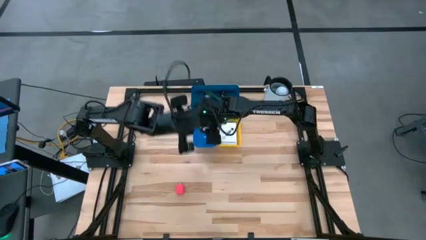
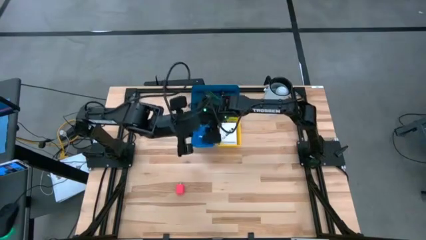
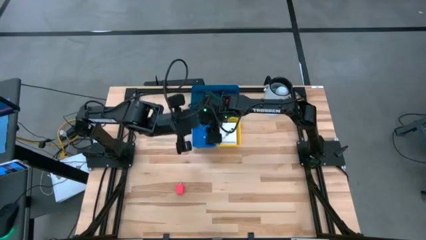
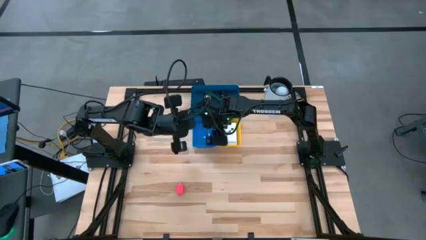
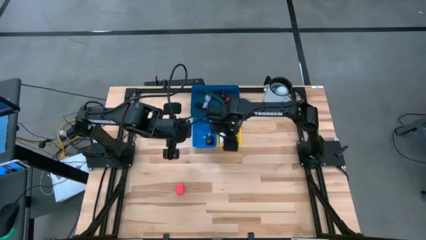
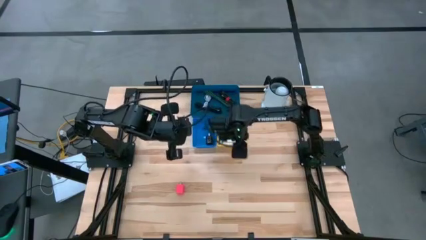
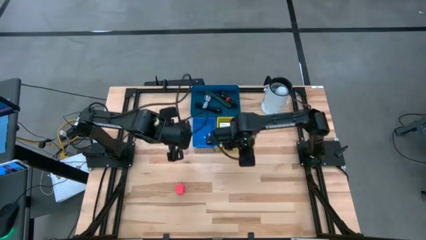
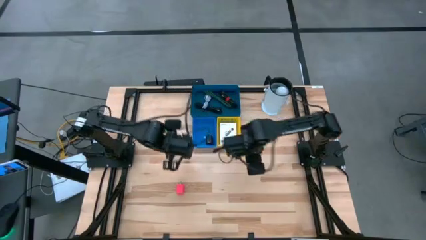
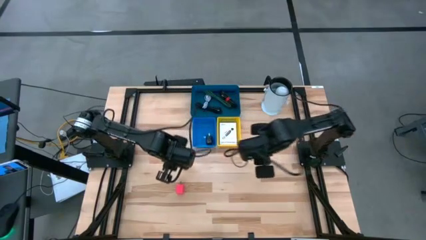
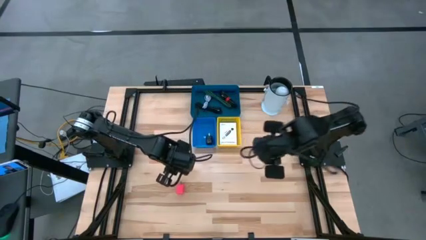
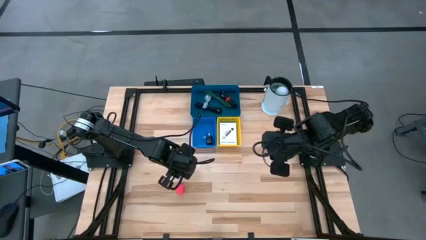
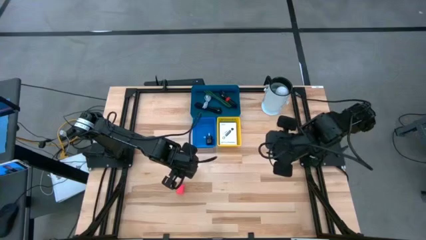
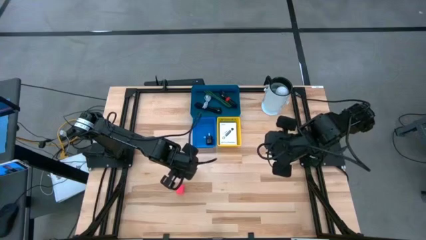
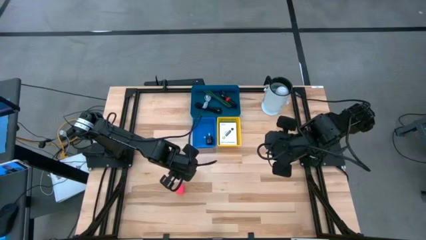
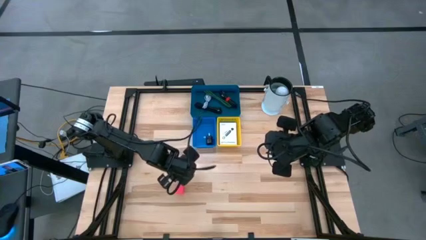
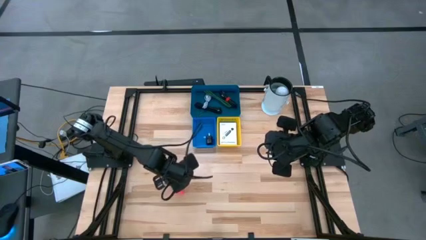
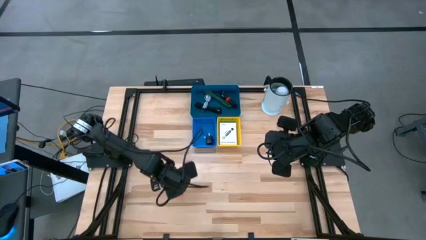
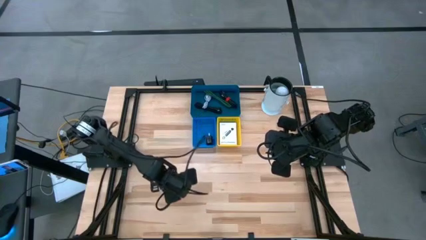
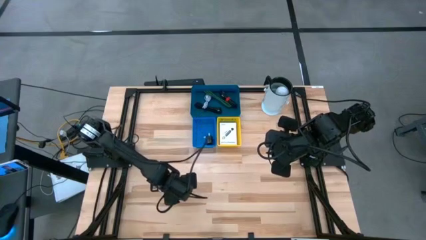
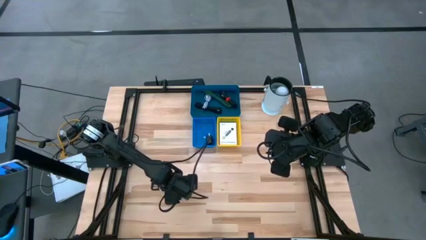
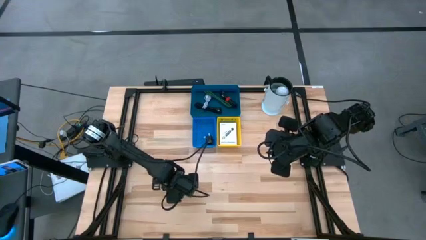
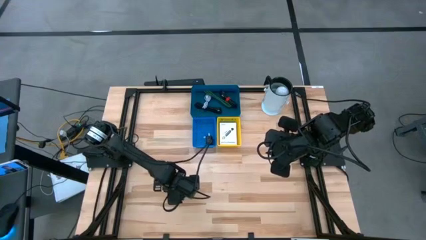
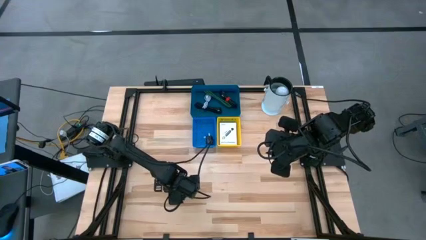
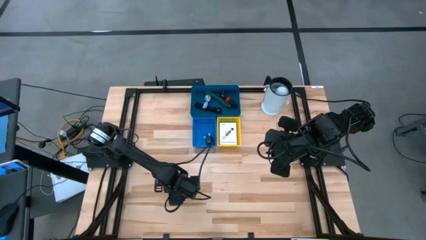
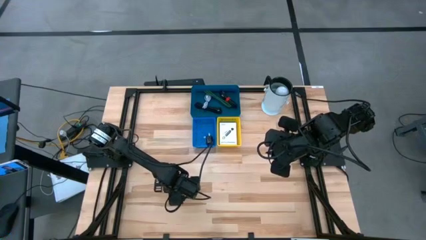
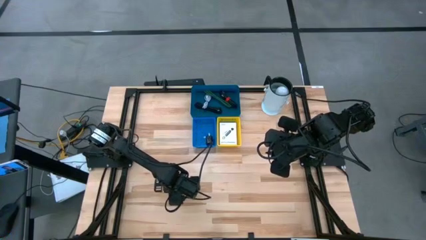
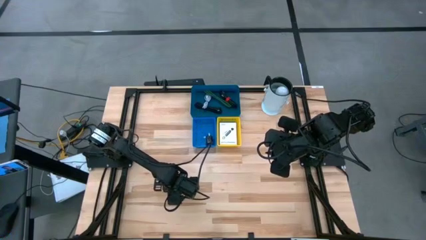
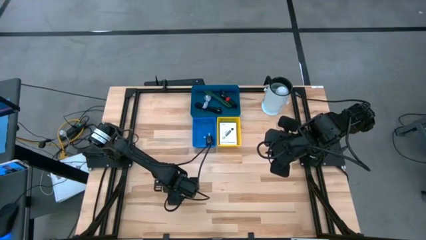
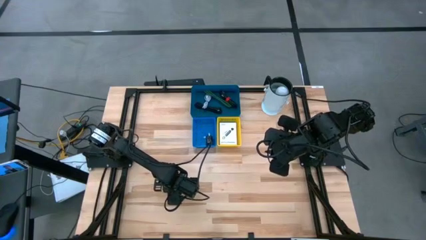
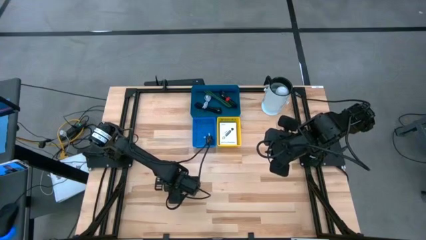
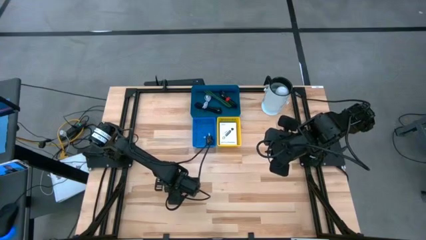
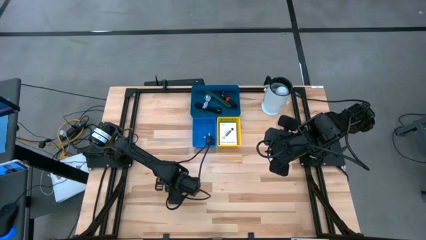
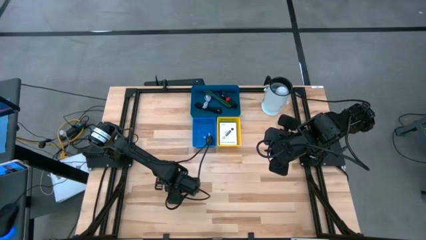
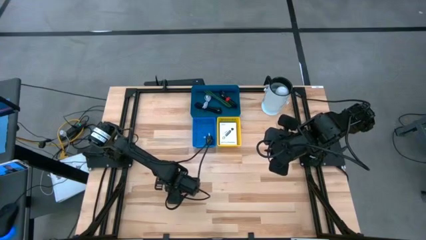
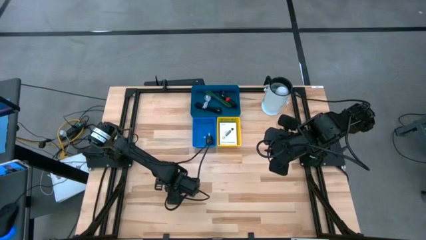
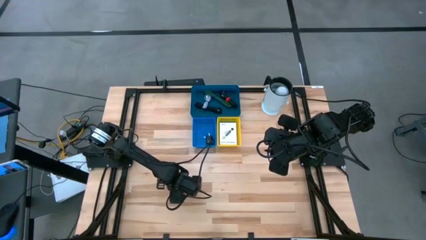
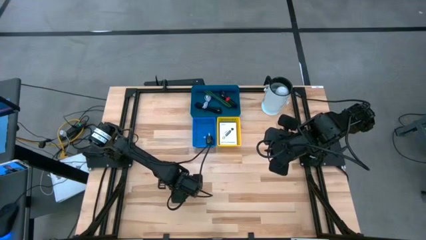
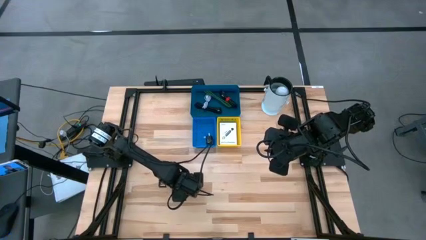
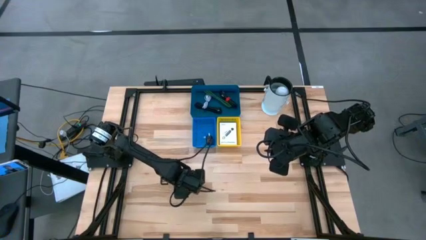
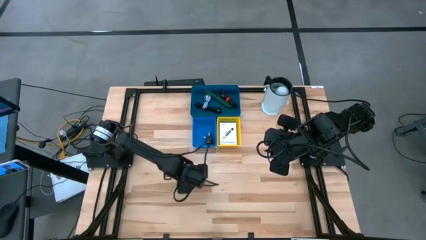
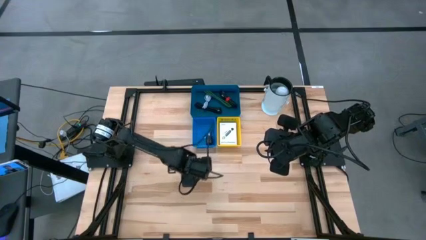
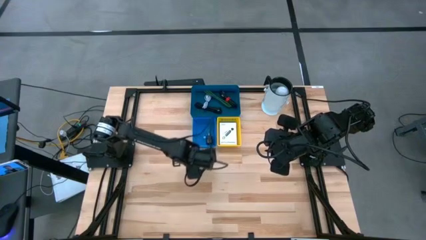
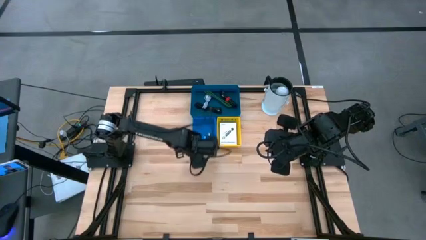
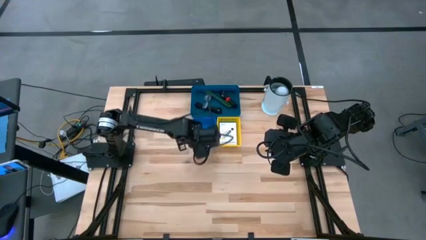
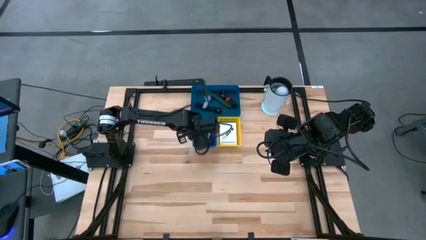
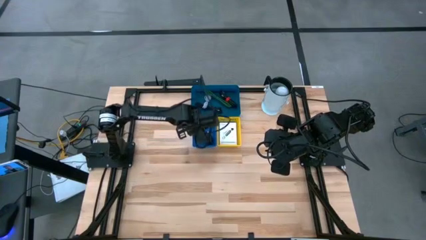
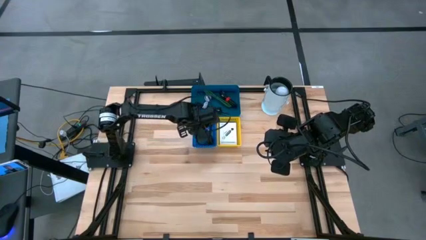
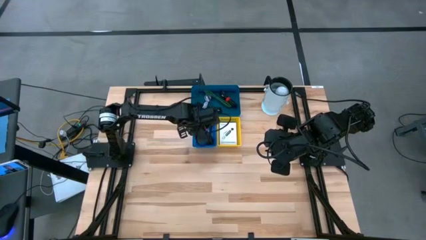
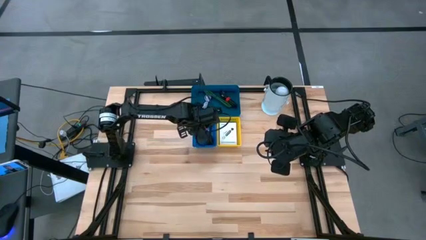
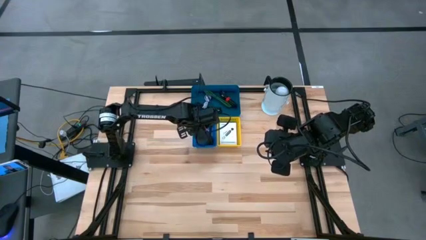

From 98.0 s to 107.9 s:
Task: Pick and place items into bin
Put the pink charger adapter into the blue bin

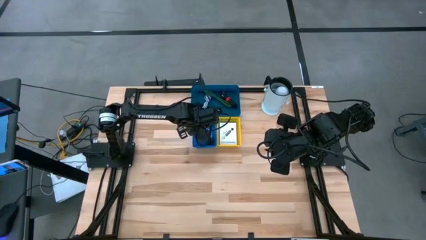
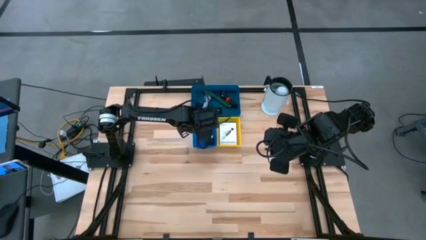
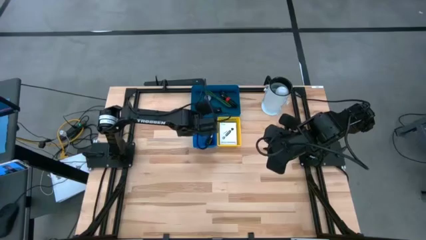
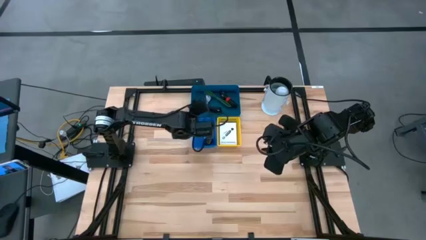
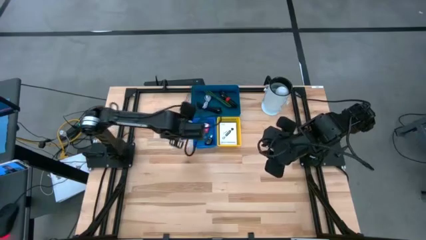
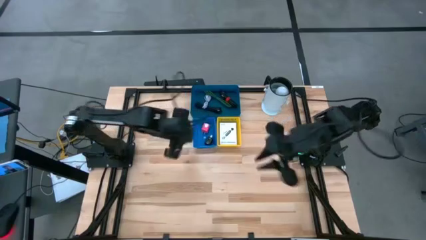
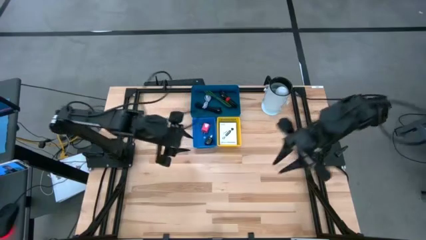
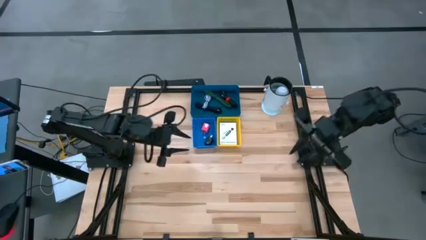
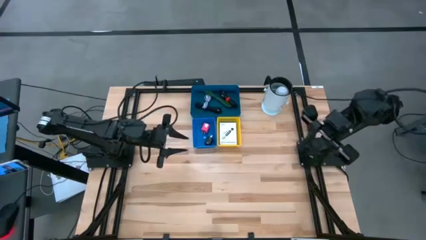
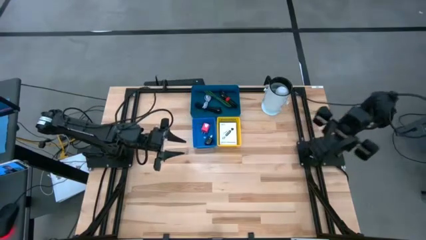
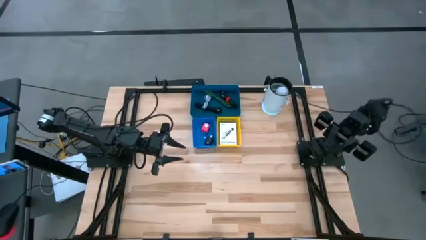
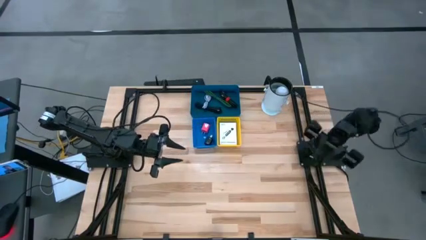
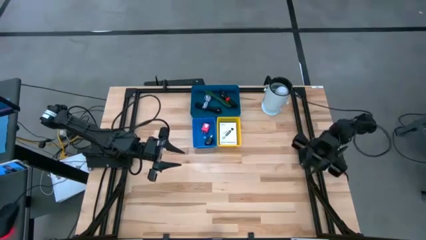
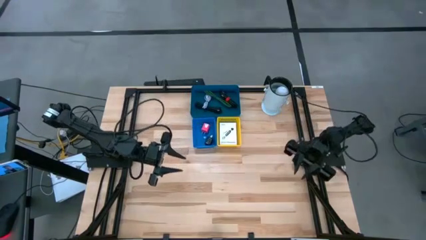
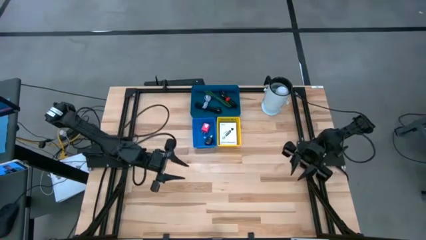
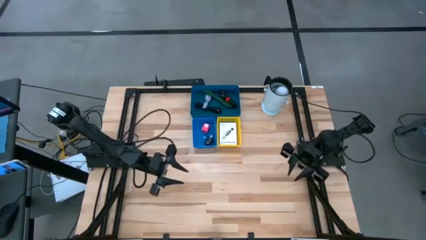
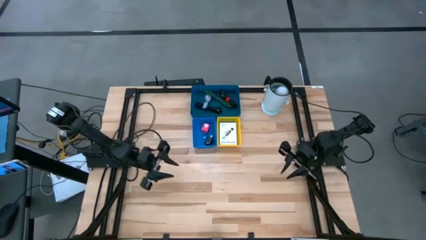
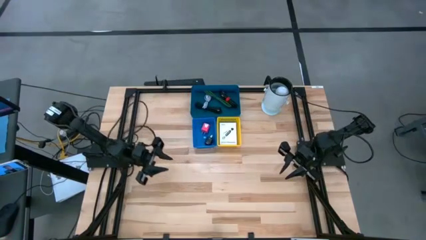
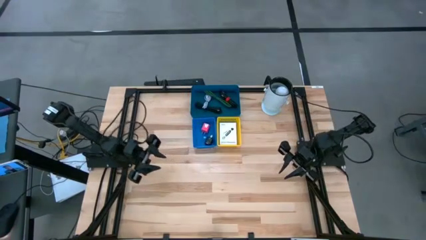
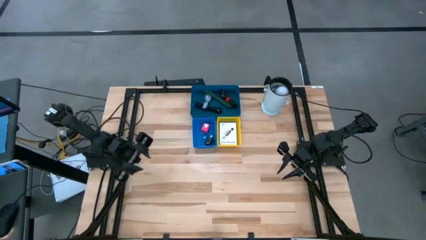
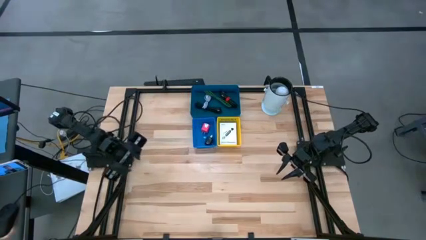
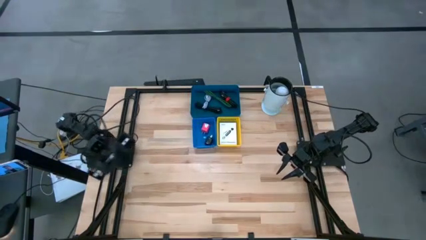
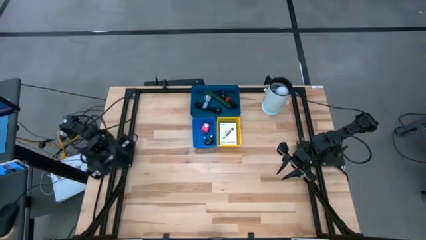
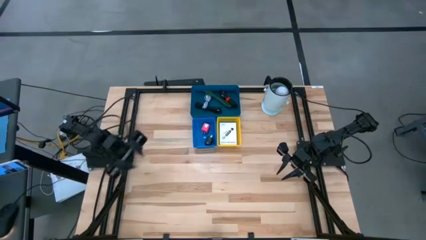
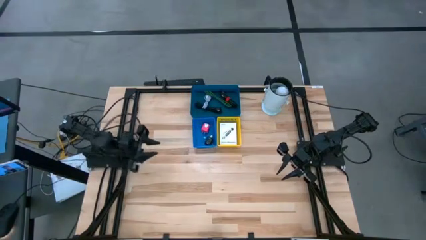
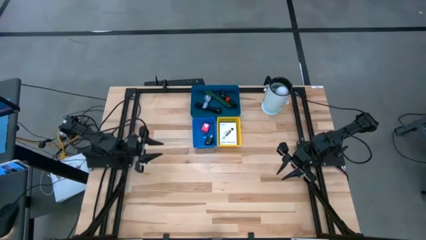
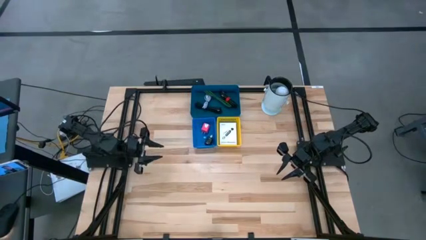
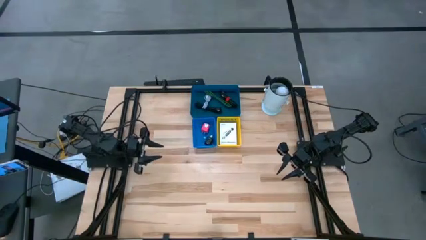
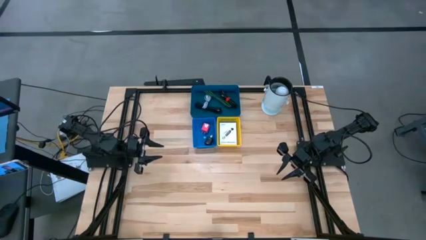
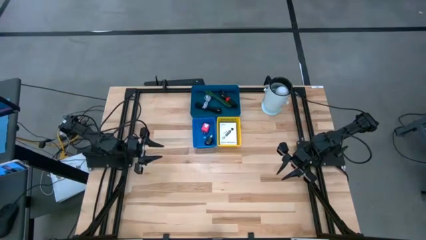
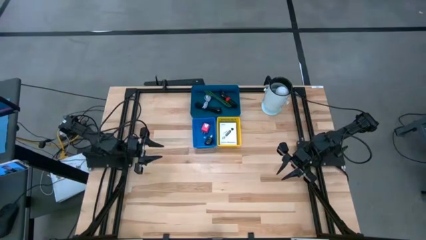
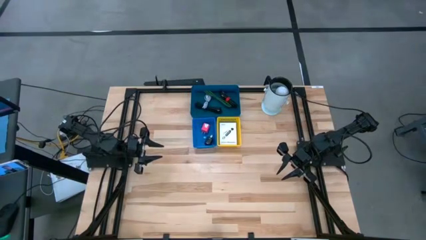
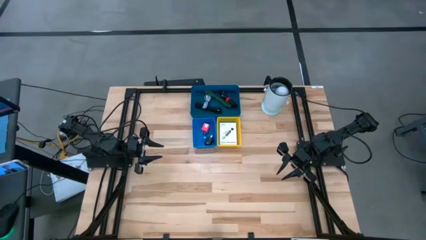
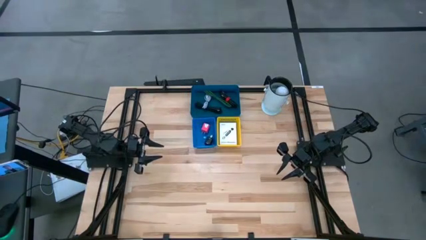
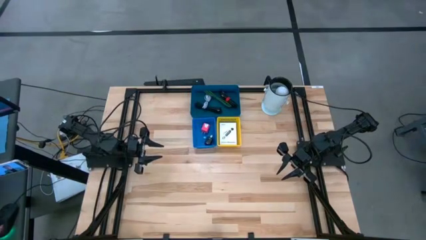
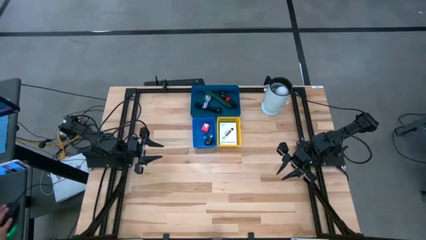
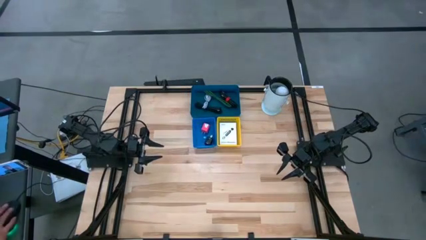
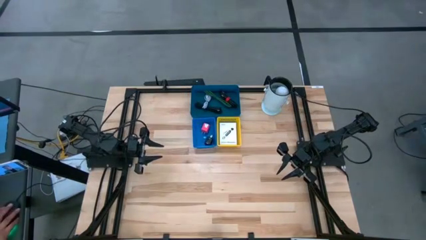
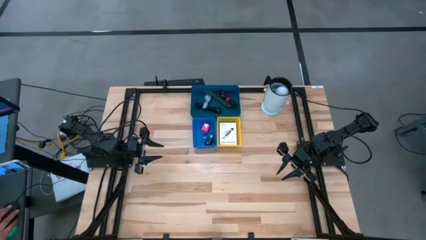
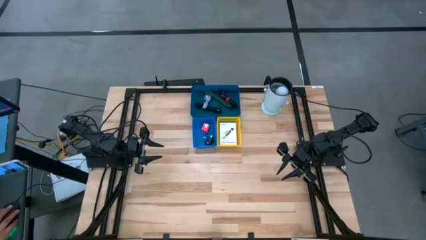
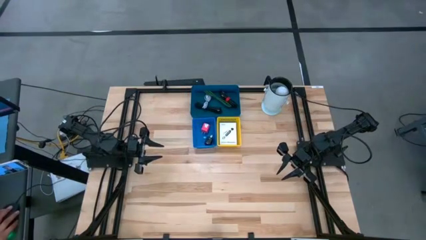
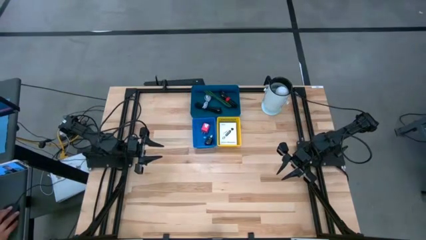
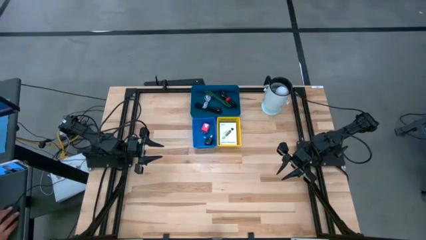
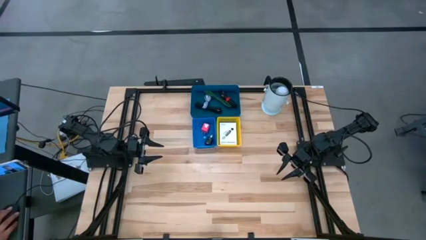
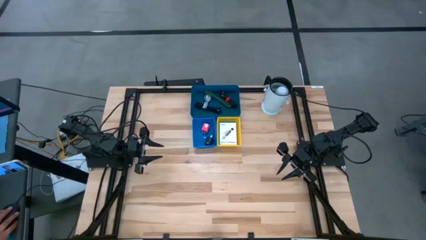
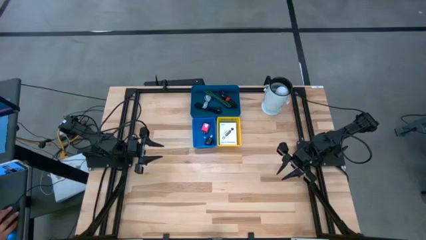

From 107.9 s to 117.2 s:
Return to Home Position
